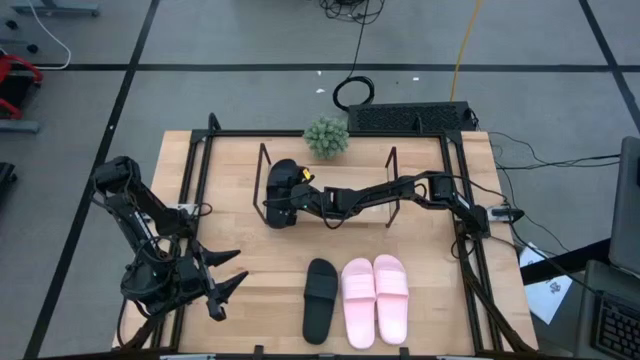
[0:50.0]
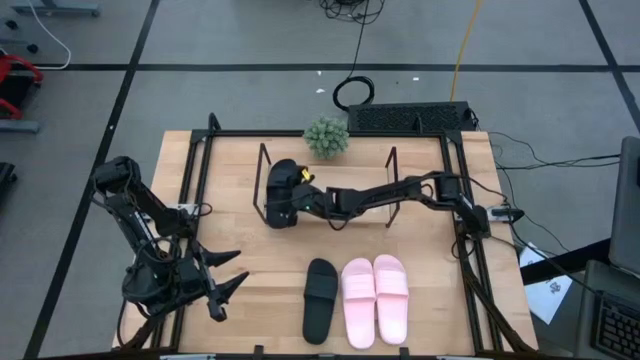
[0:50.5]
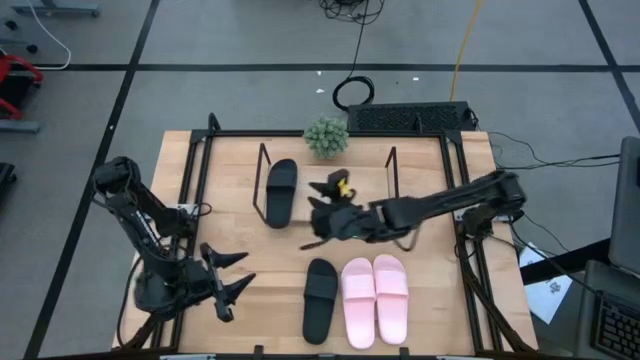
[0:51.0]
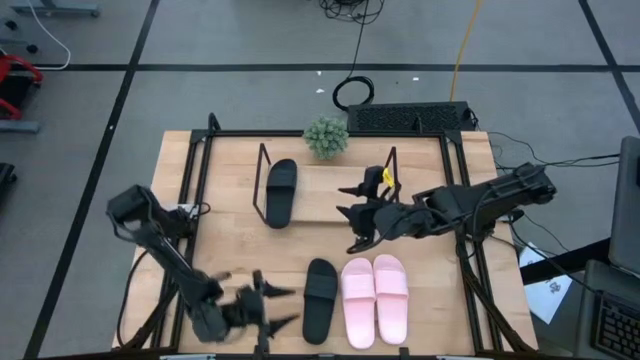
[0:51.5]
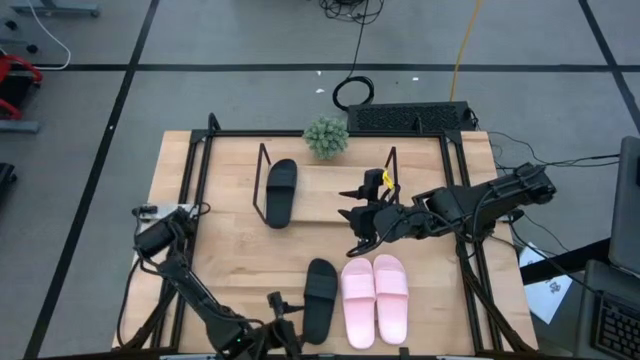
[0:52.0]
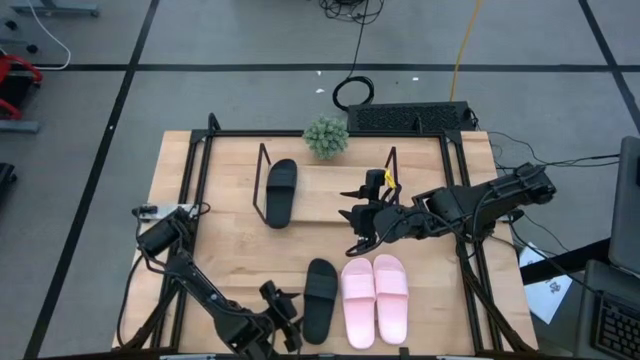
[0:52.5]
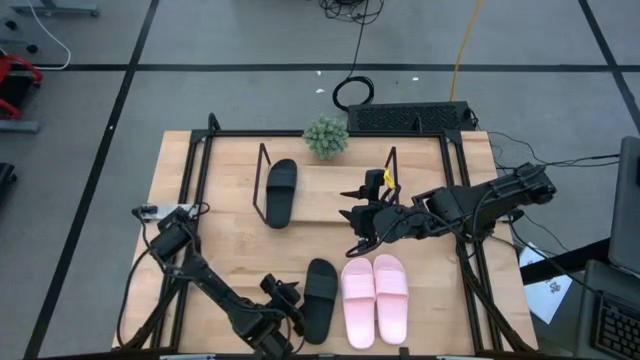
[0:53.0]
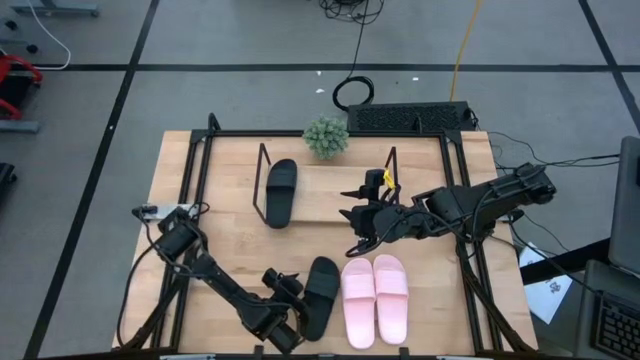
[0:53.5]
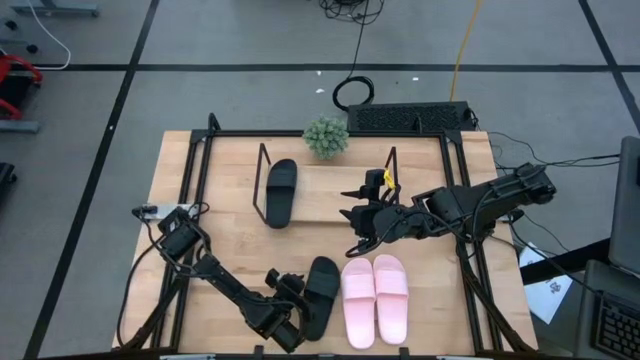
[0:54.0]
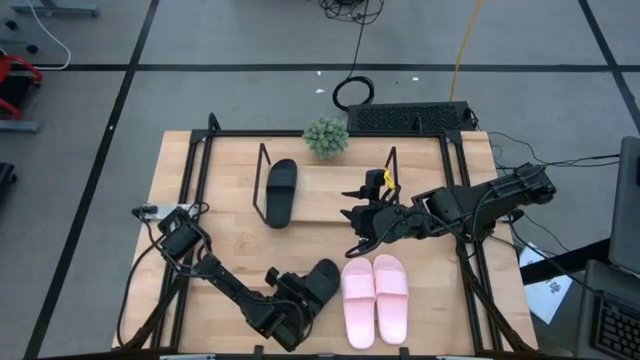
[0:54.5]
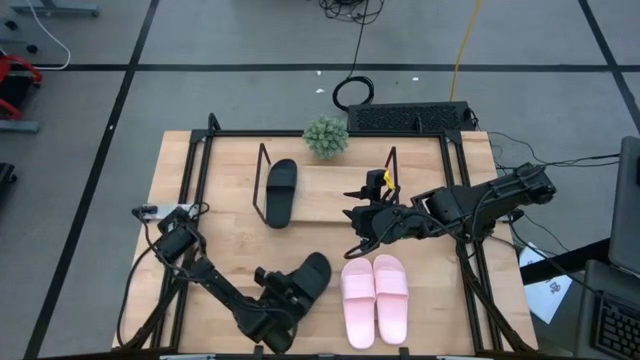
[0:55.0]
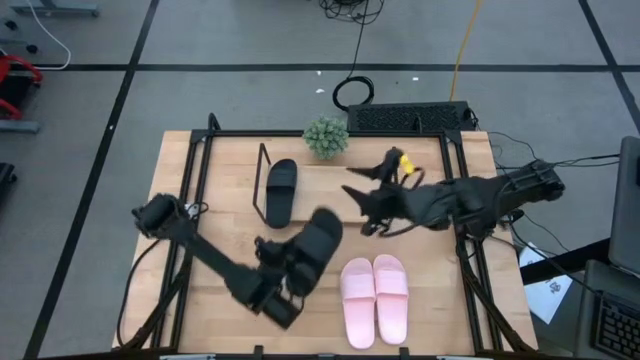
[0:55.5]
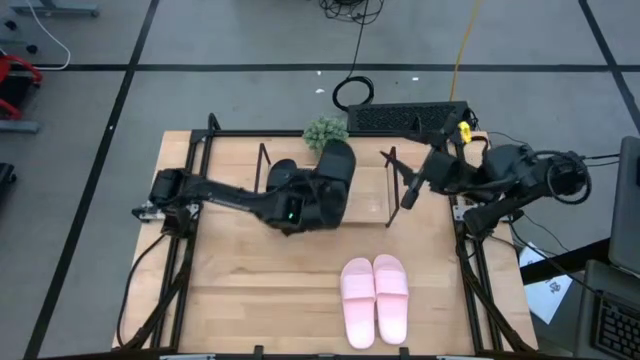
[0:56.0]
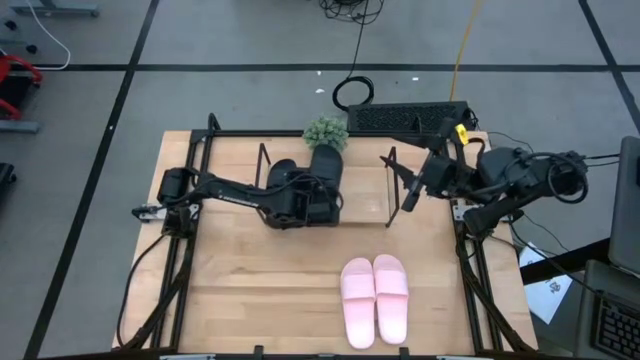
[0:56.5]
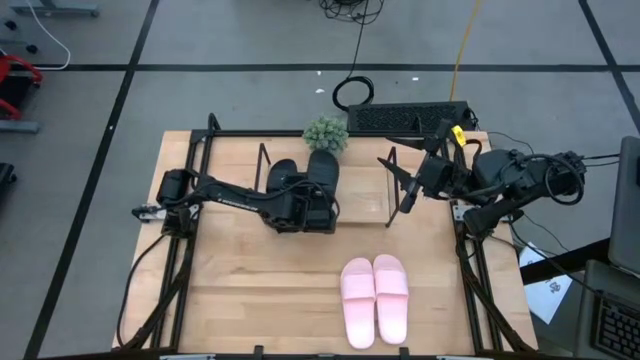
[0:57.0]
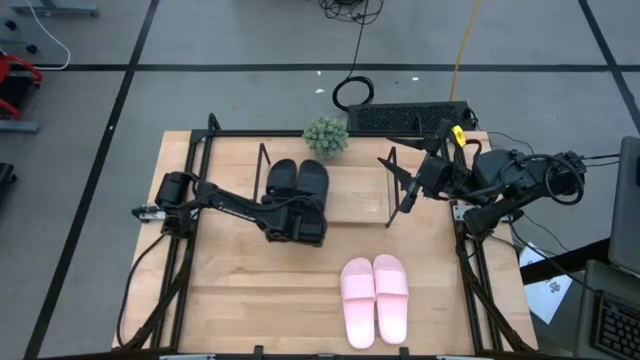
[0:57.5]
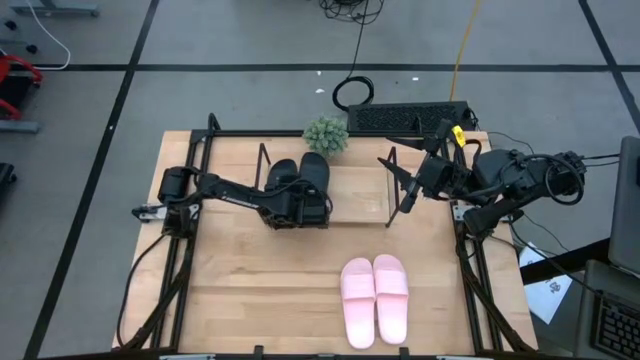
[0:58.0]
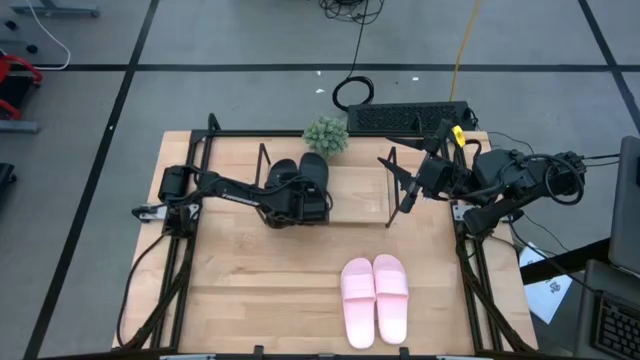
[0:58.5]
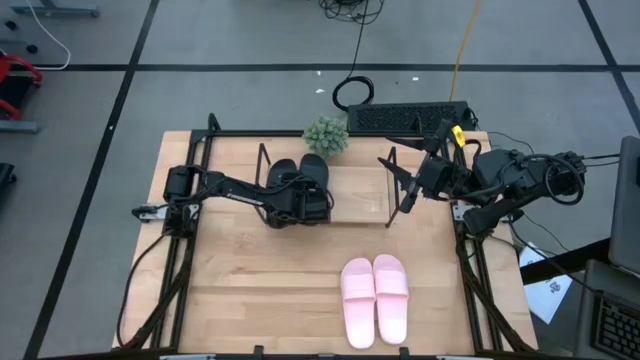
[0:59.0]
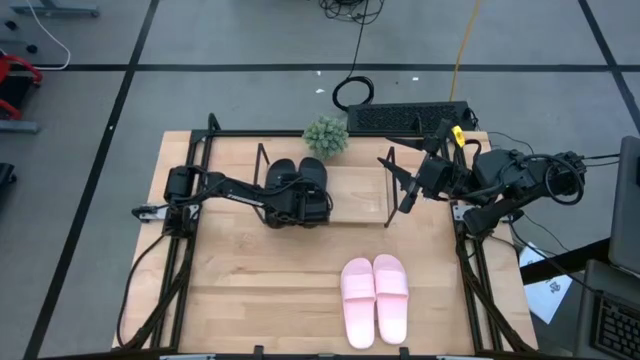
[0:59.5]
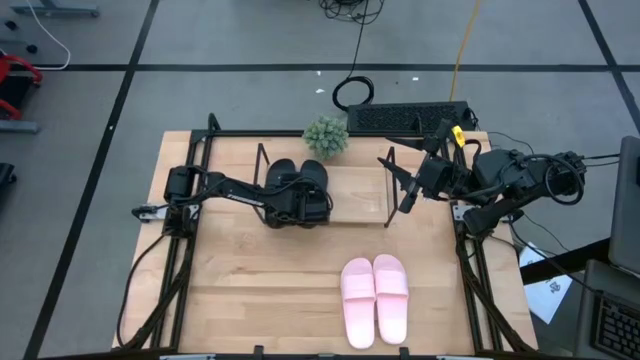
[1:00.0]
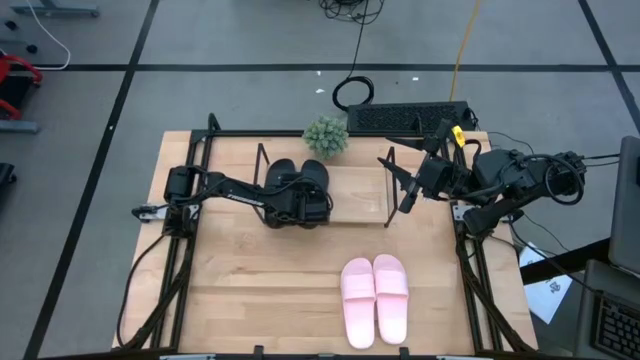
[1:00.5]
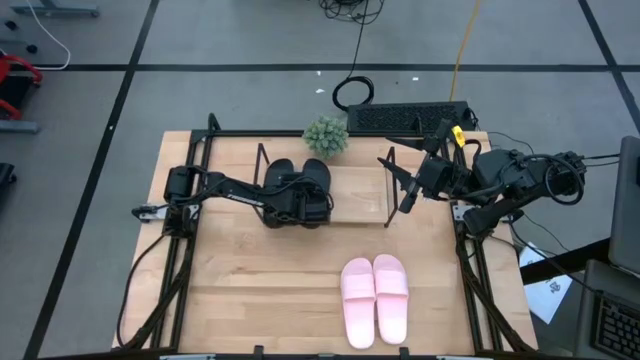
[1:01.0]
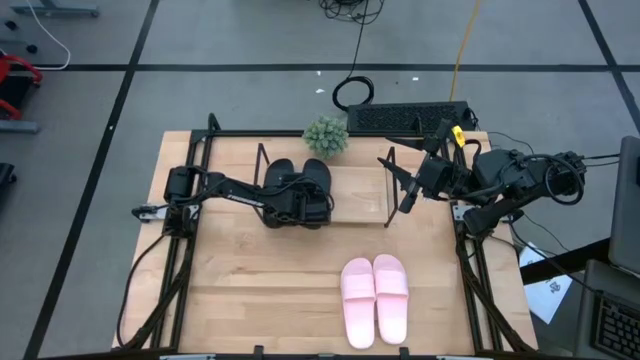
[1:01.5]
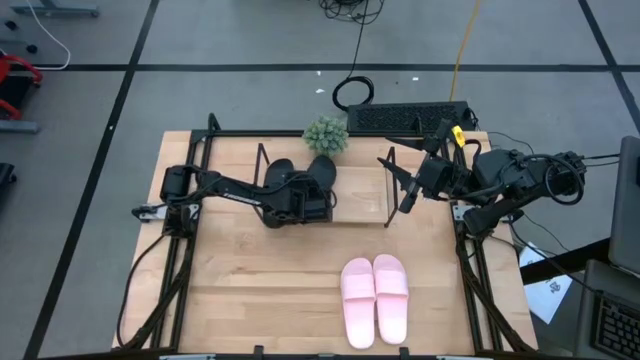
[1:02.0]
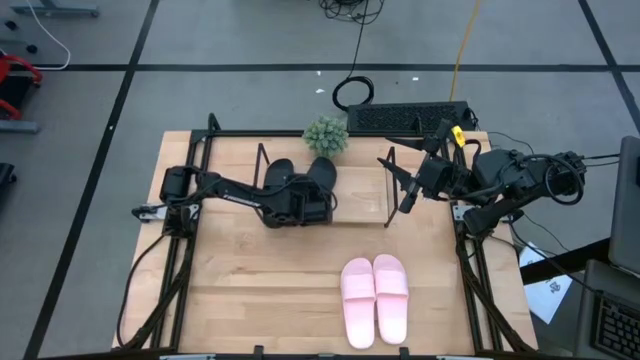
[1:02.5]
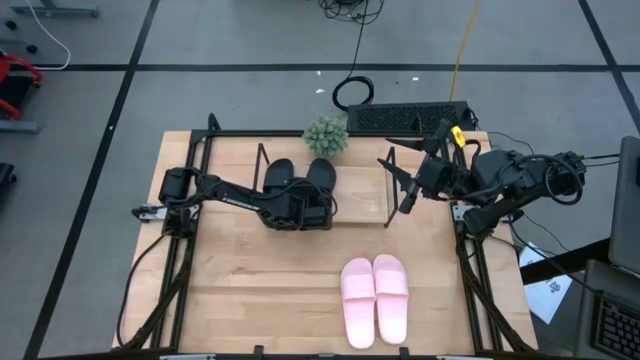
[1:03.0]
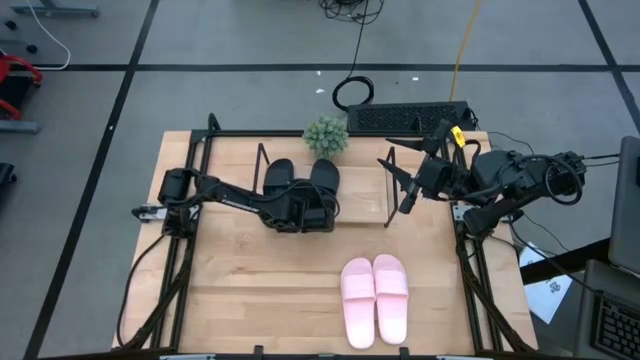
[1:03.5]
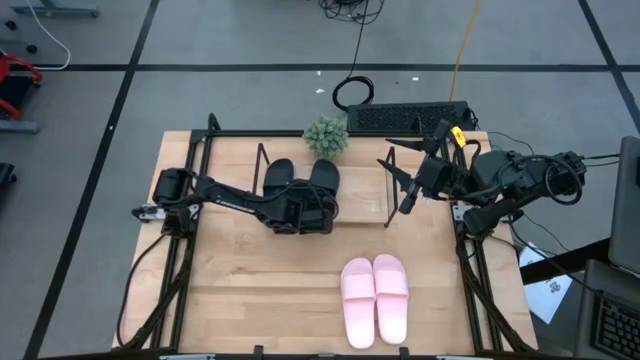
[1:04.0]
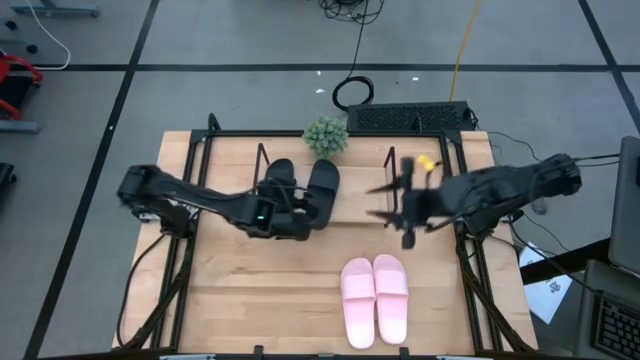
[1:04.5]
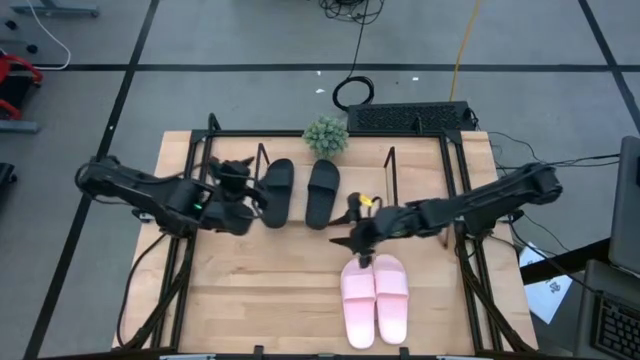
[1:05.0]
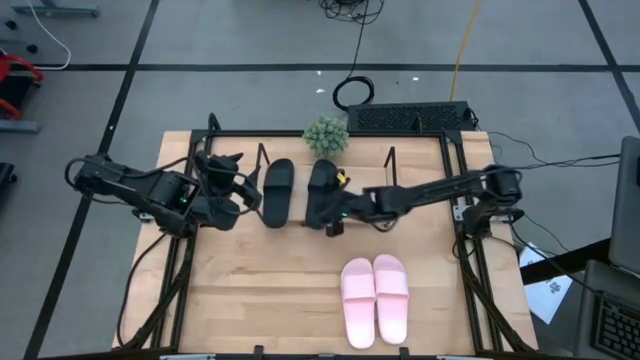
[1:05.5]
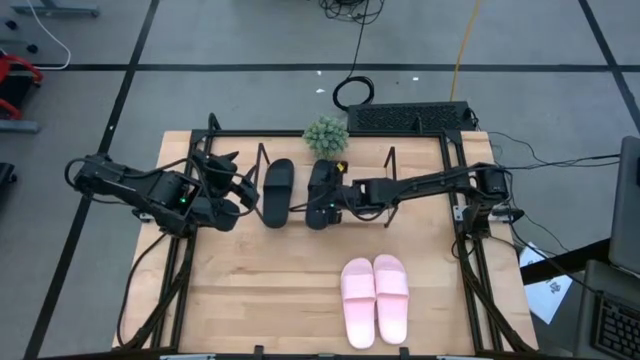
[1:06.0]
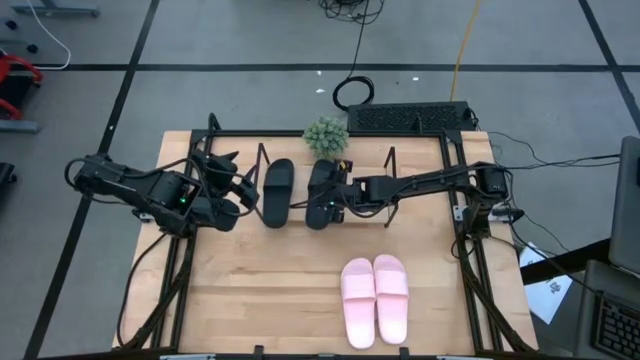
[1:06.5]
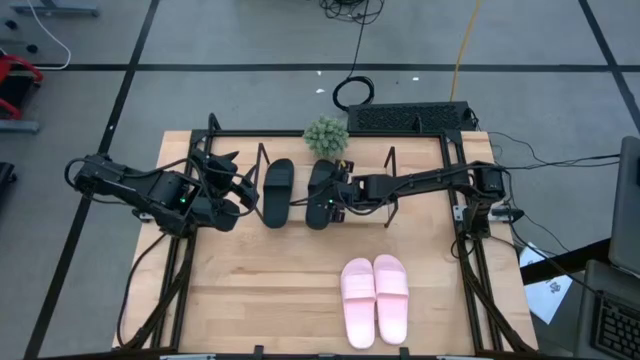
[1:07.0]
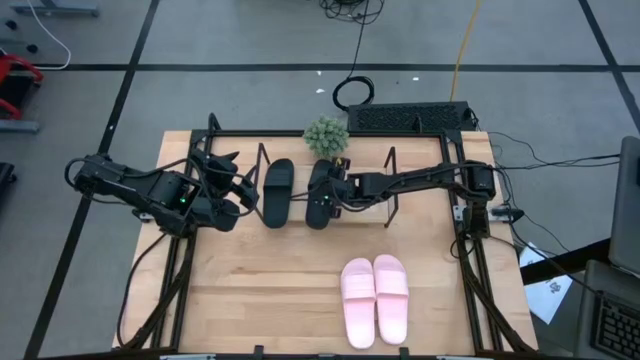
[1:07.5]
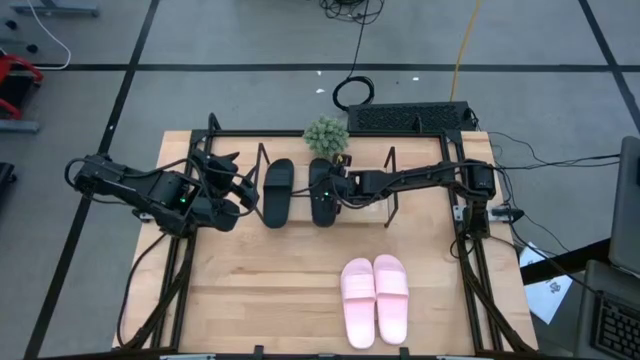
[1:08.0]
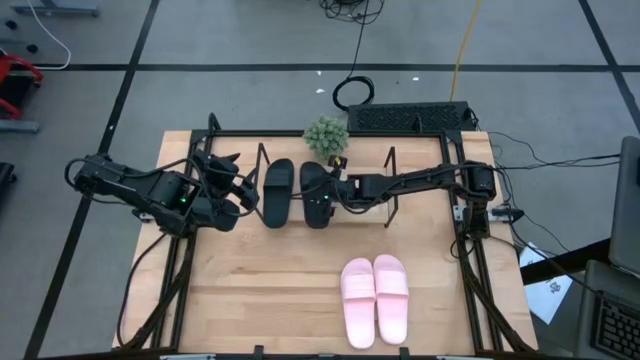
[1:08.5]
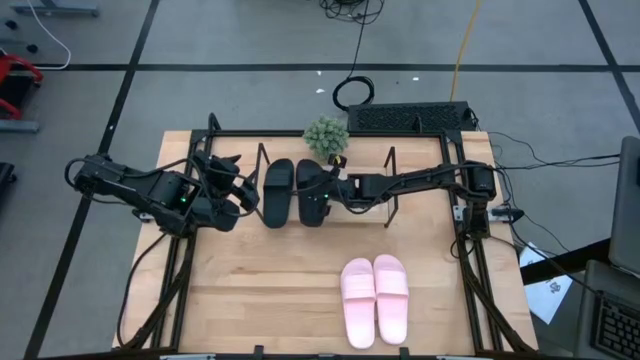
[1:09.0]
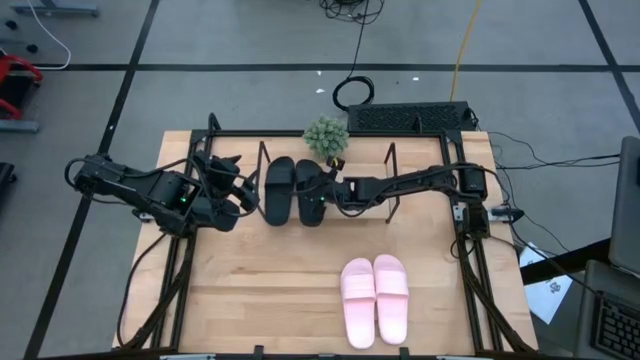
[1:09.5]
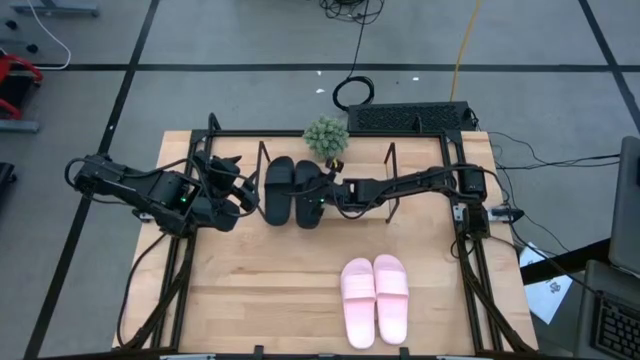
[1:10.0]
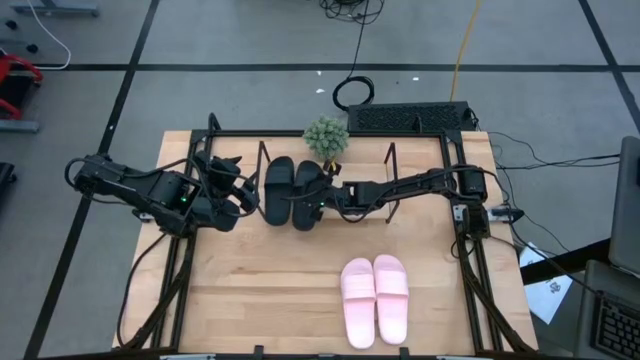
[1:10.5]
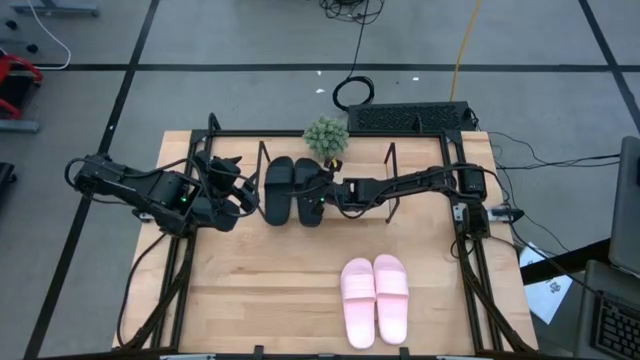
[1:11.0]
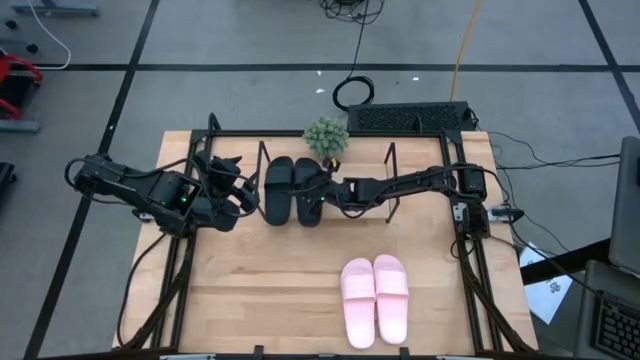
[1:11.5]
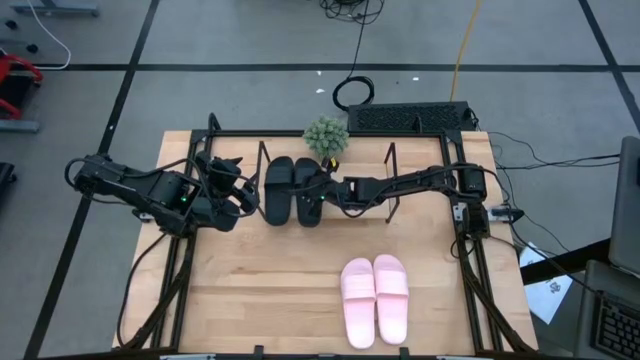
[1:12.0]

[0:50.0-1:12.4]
Task: Pick and place slides into the shelf
Put the black slides on the shelf
